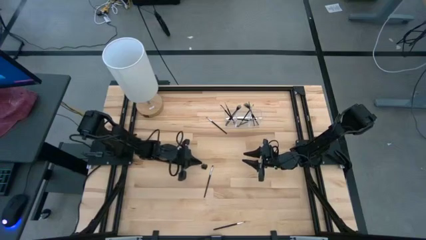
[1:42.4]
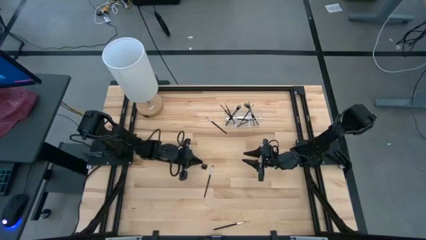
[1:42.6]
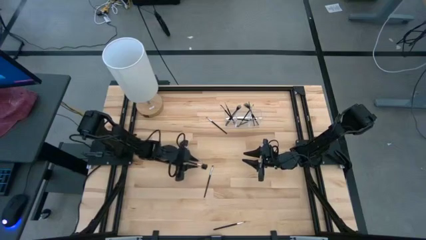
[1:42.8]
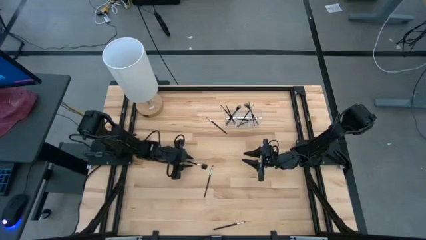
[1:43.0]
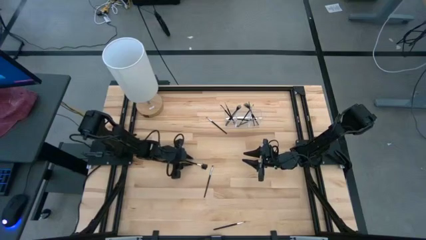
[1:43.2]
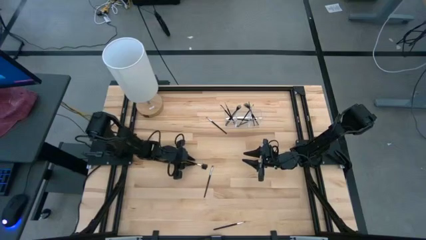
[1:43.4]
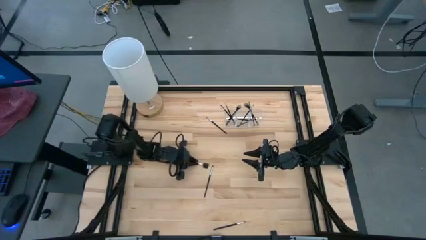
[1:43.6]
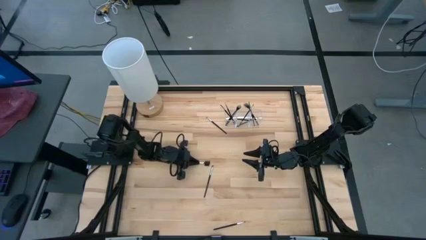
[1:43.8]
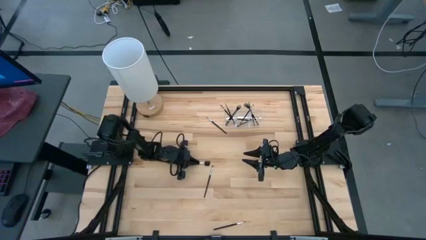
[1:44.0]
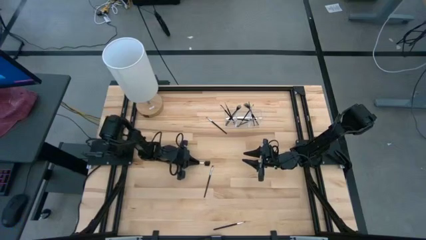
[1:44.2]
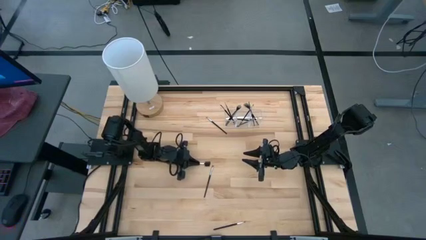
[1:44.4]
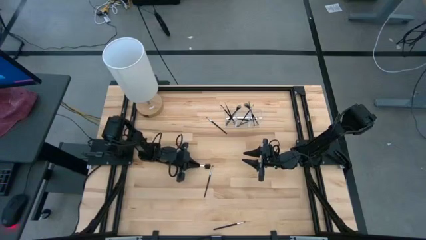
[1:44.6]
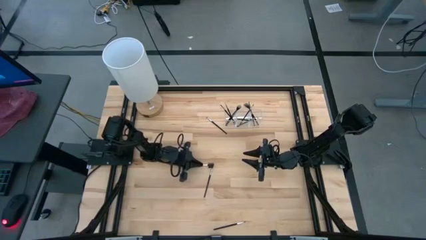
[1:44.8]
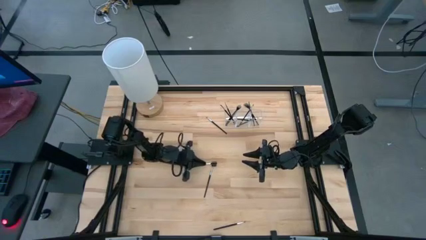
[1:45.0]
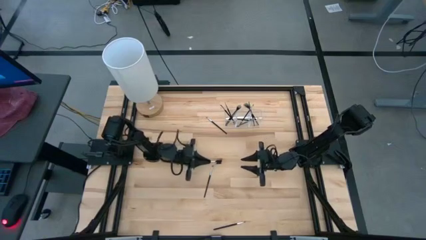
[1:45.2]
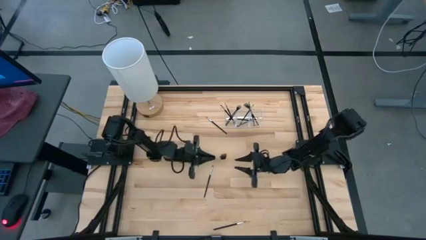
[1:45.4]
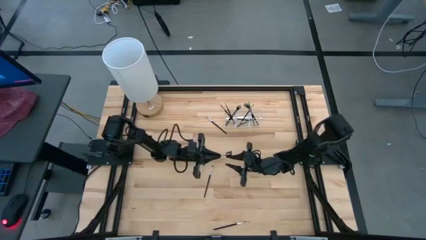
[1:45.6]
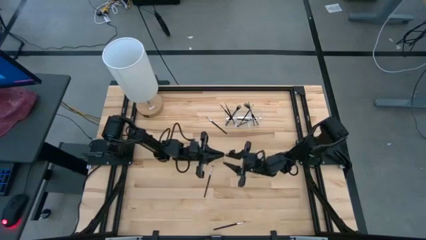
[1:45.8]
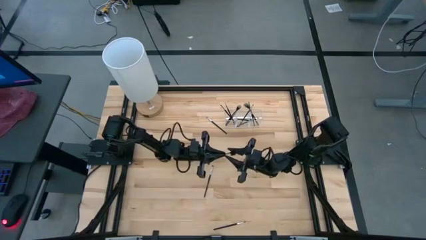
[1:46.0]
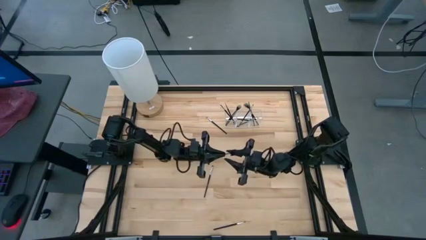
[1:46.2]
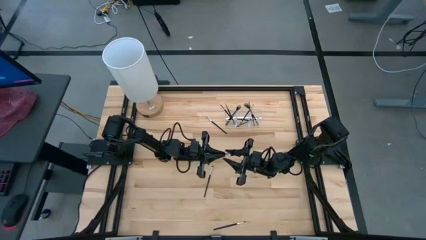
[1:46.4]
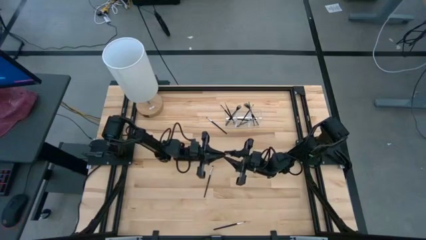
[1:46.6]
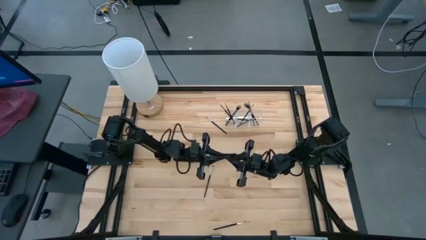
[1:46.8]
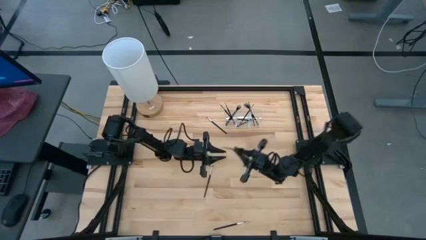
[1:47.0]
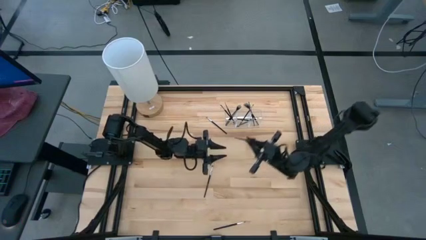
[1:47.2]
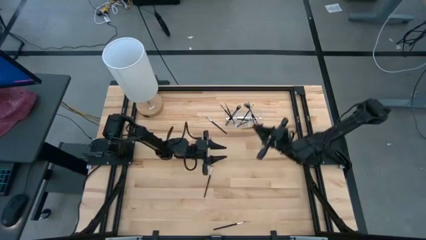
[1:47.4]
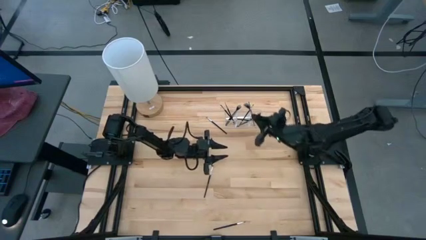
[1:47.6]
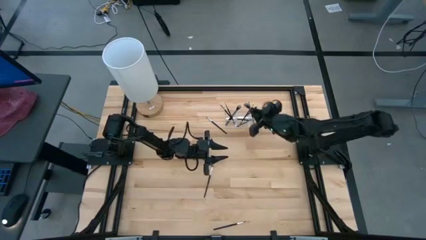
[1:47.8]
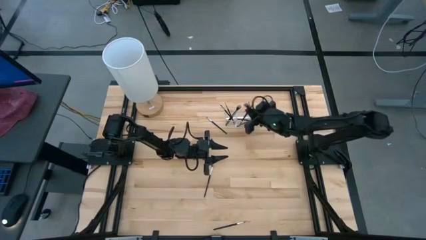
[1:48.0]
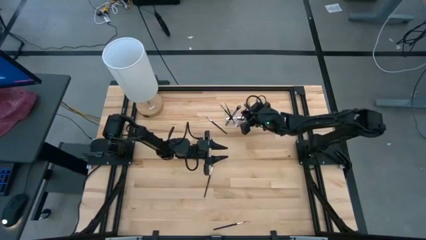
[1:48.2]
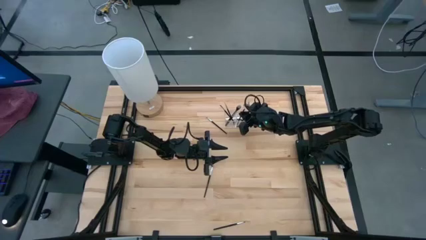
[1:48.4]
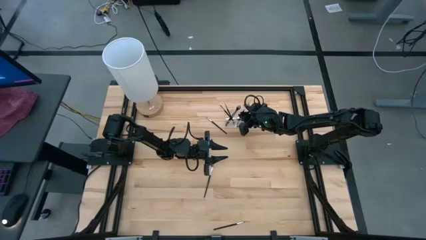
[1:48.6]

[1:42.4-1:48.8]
Task: Put items in baskets/containers
Put the black eyebrow brush into the transparent organizer

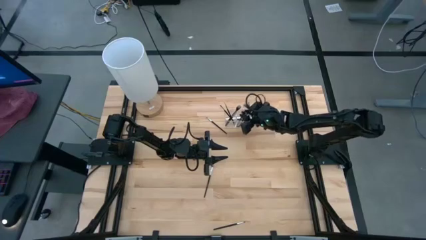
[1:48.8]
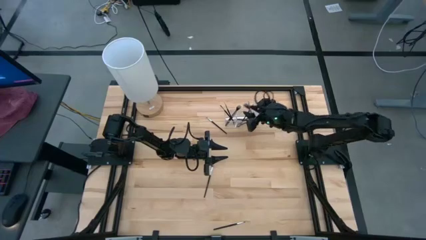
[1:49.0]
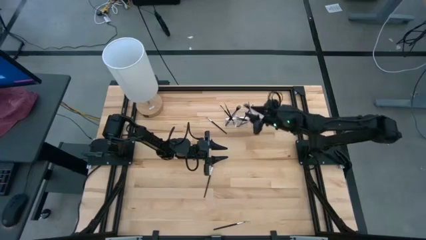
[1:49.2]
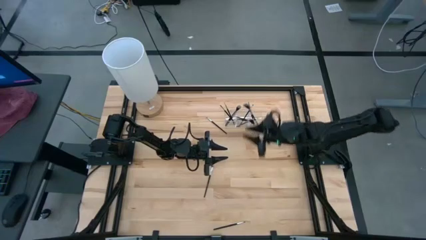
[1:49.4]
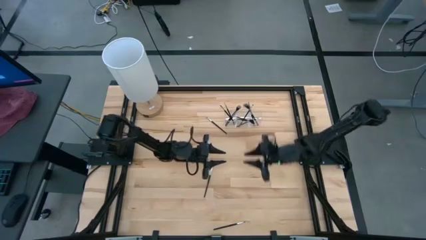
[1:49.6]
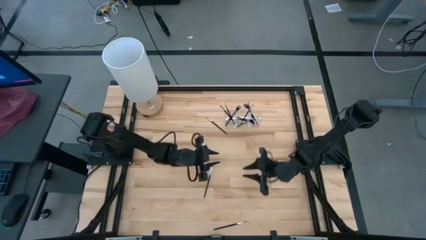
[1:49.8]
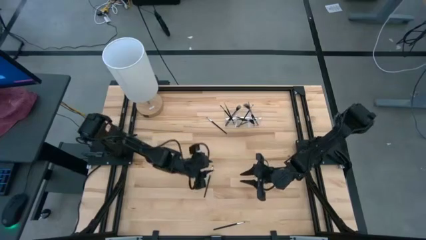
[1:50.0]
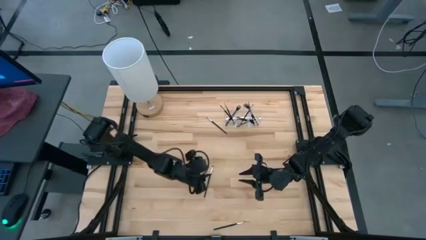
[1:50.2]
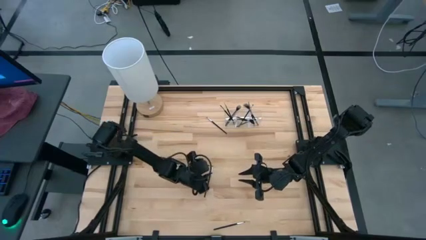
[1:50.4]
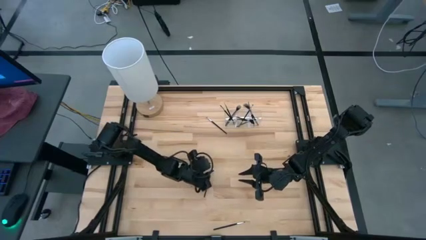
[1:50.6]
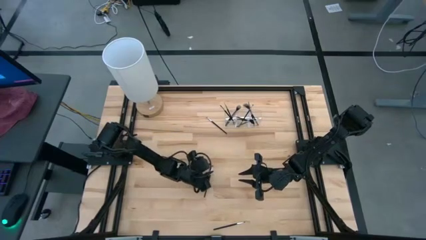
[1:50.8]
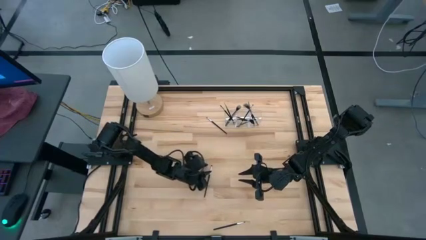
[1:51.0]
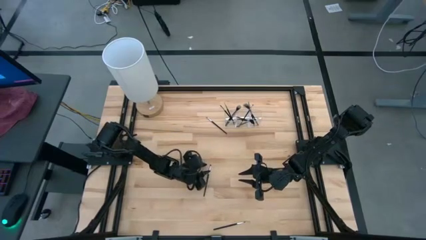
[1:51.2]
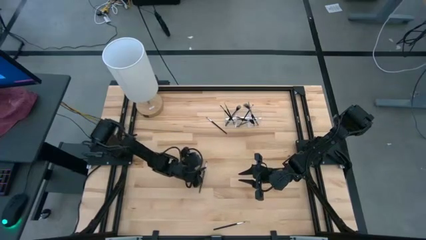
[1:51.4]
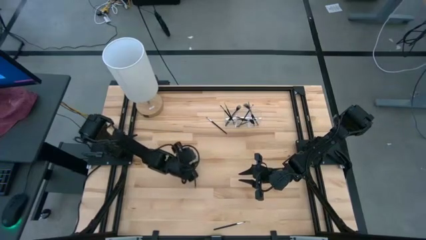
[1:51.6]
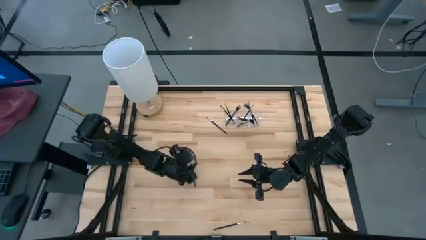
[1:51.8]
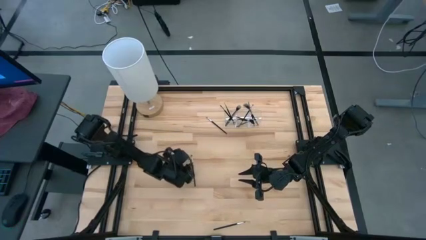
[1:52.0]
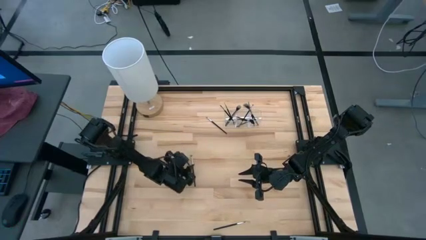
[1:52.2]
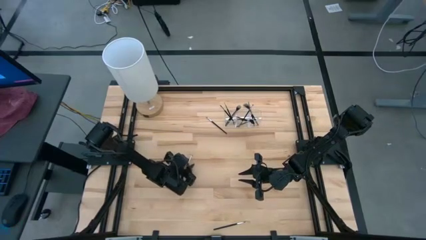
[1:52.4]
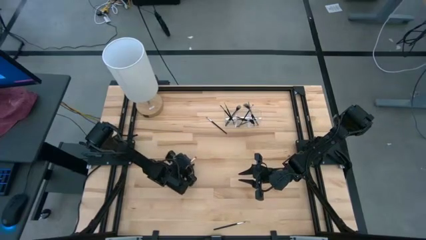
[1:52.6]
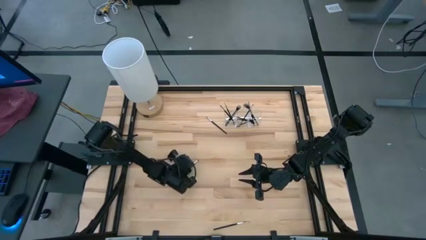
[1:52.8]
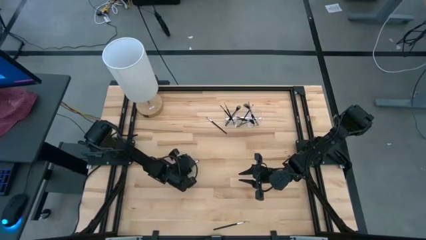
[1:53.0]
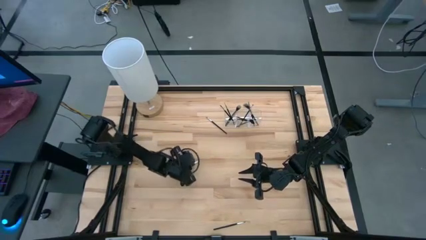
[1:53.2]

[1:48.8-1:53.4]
Put the black eyeshadow brush into the transparent organizer

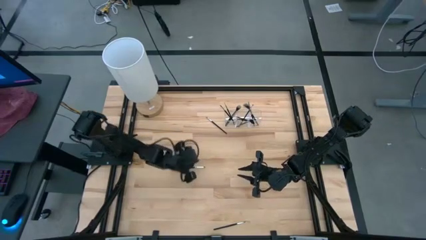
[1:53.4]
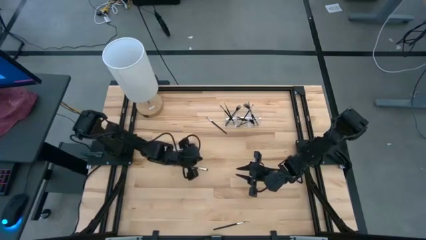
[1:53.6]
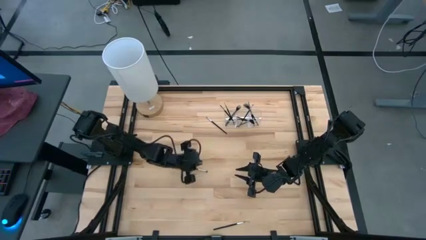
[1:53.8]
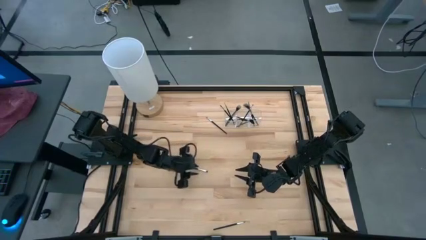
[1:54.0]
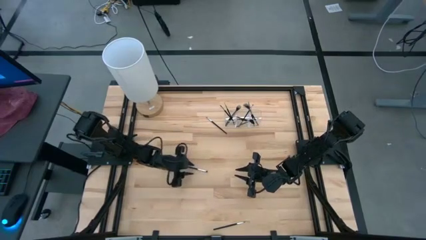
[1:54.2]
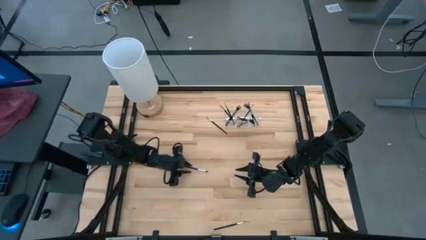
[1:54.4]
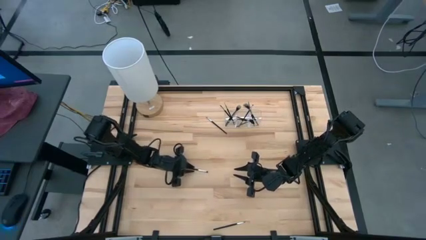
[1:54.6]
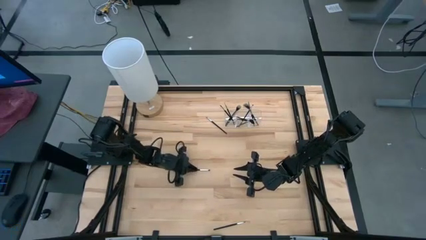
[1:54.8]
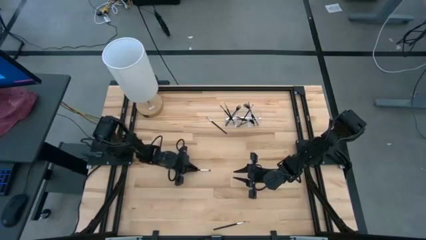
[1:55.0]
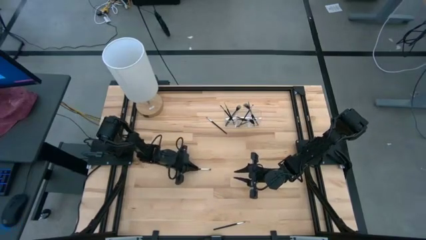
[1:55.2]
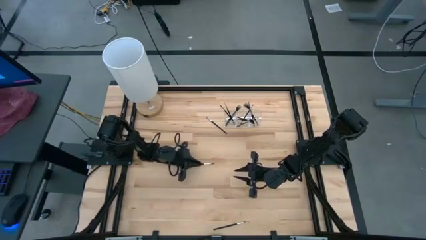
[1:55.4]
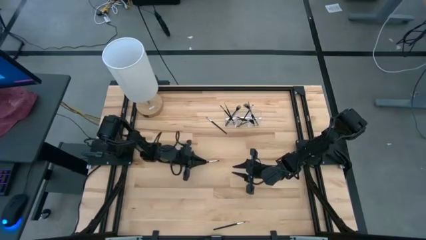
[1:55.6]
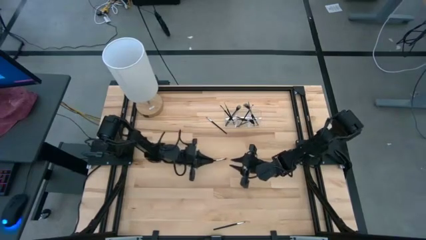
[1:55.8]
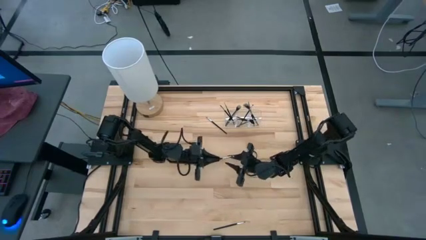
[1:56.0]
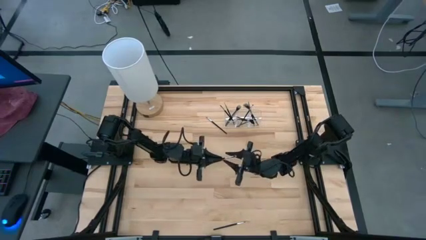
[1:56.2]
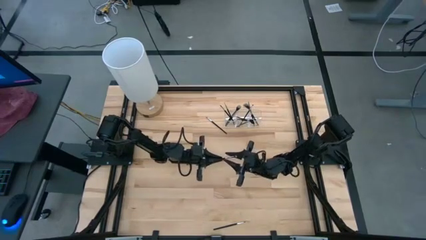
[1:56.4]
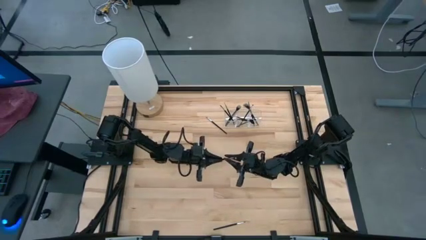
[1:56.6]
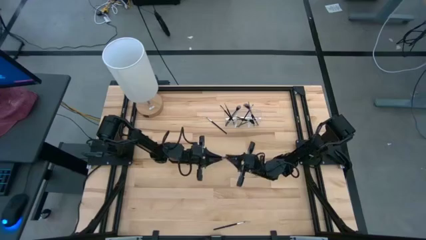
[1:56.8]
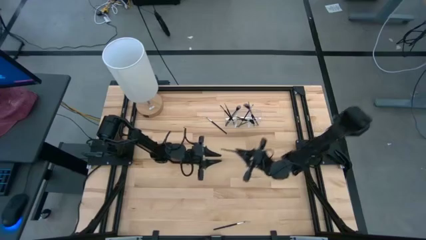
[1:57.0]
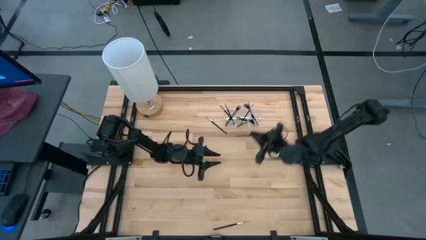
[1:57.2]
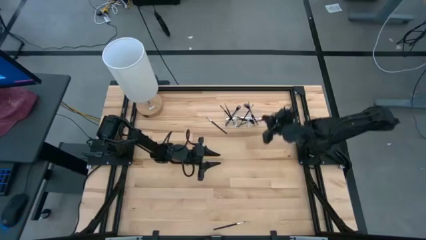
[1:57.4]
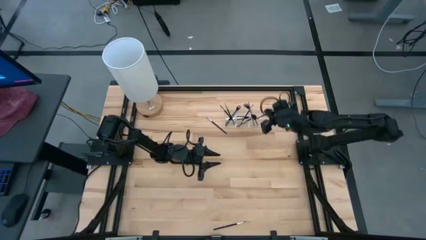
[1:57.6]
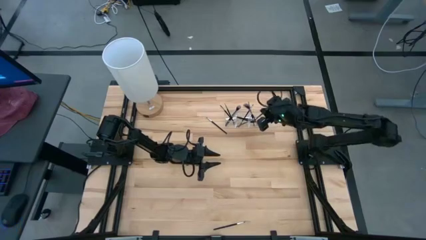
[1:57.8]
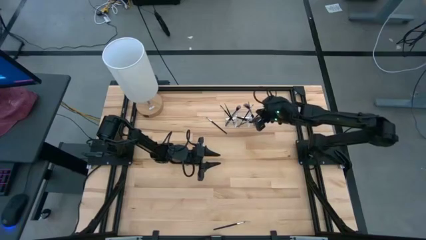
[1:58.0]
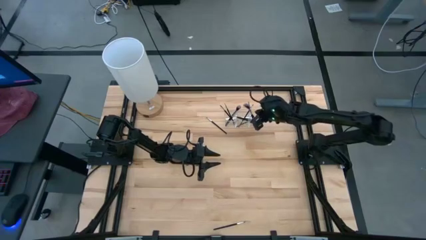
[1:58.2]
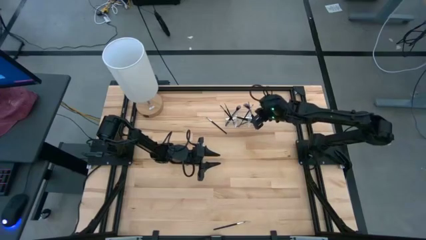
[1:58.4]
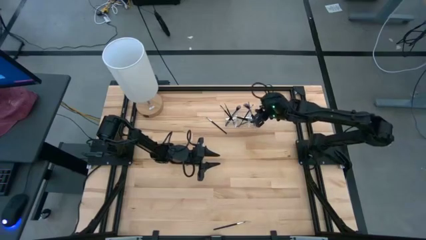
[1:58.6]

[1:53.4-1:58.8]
Put the black eyeshadow brush into the transparent organizer
